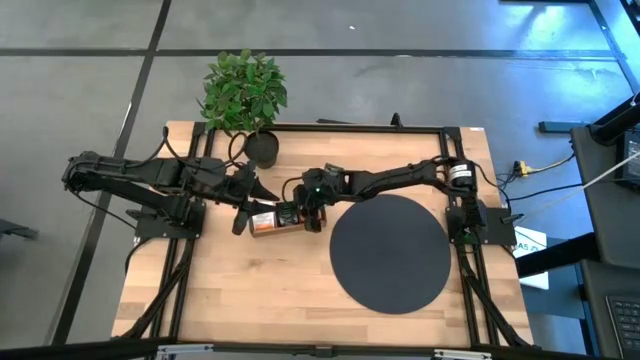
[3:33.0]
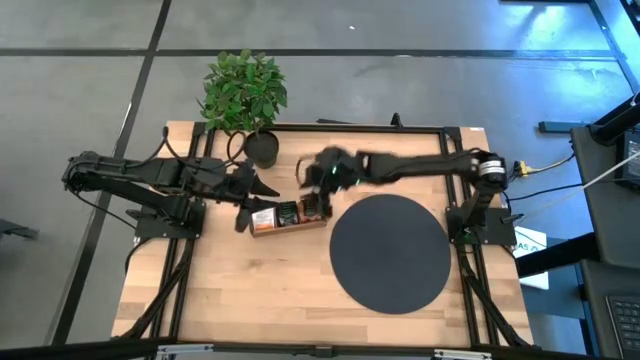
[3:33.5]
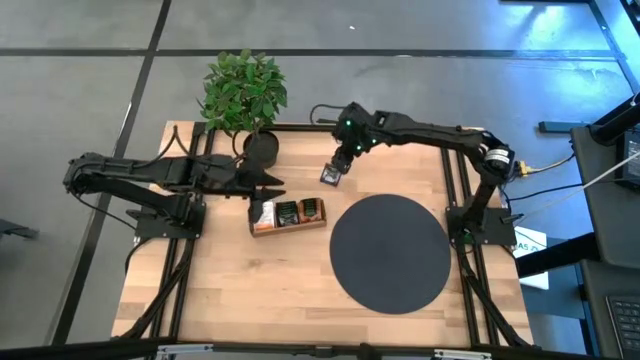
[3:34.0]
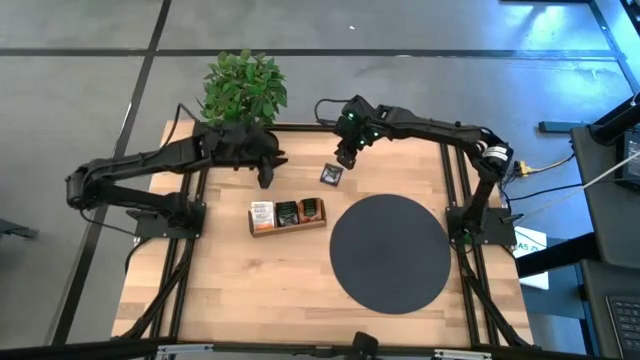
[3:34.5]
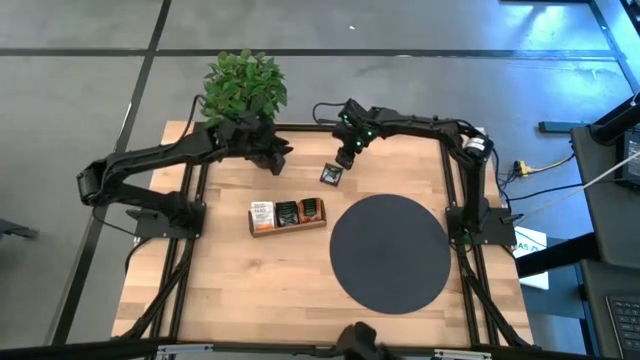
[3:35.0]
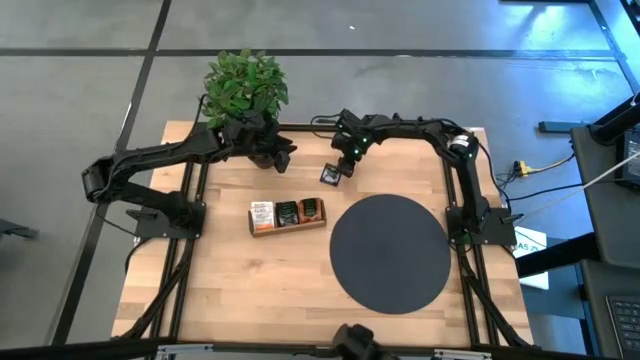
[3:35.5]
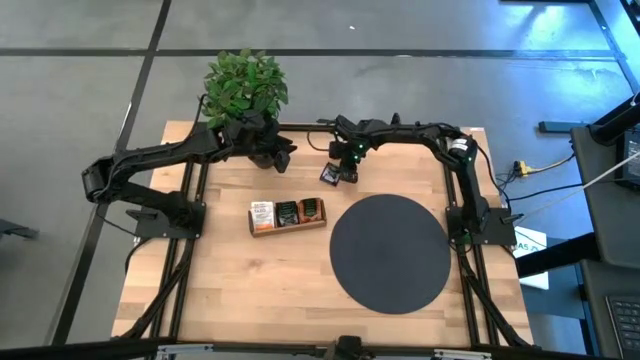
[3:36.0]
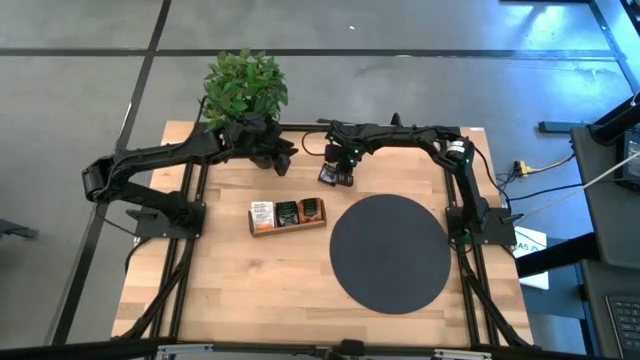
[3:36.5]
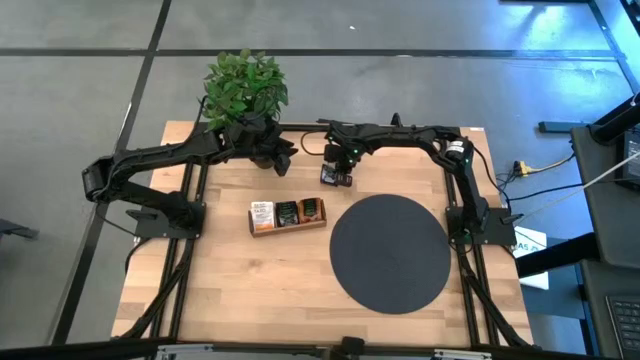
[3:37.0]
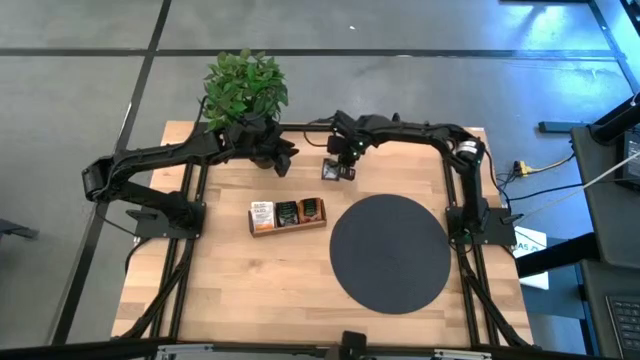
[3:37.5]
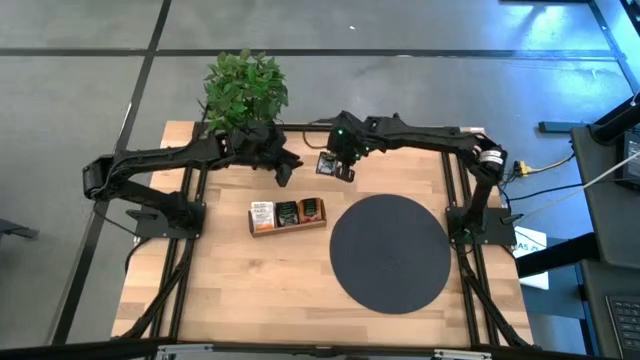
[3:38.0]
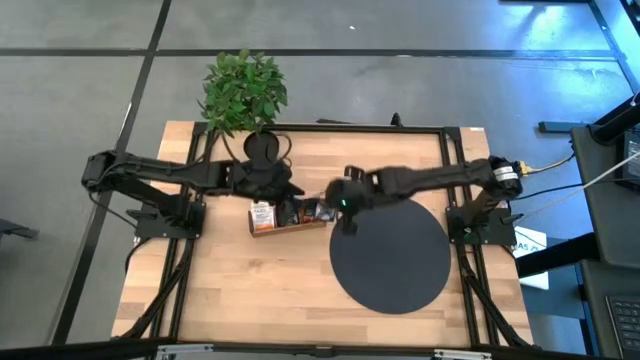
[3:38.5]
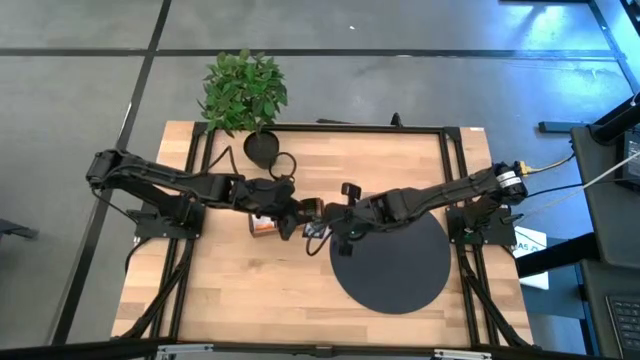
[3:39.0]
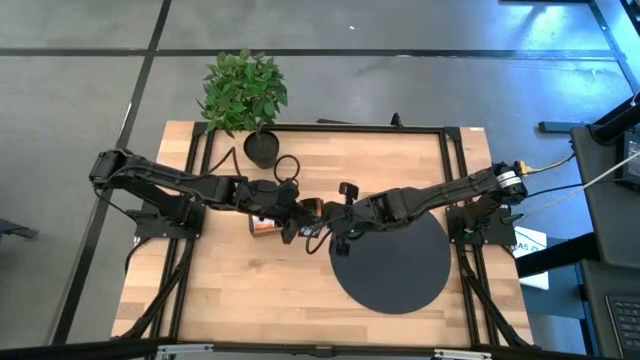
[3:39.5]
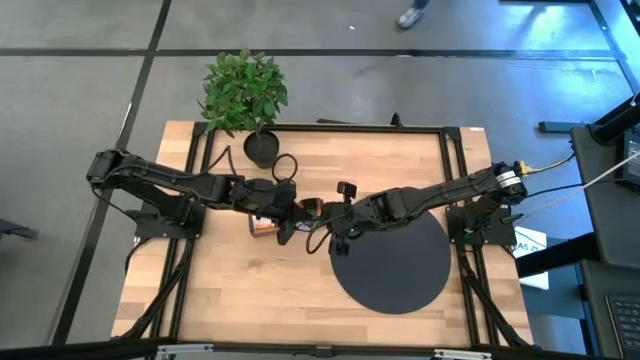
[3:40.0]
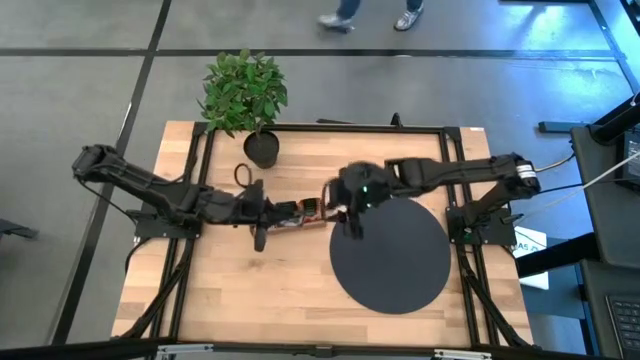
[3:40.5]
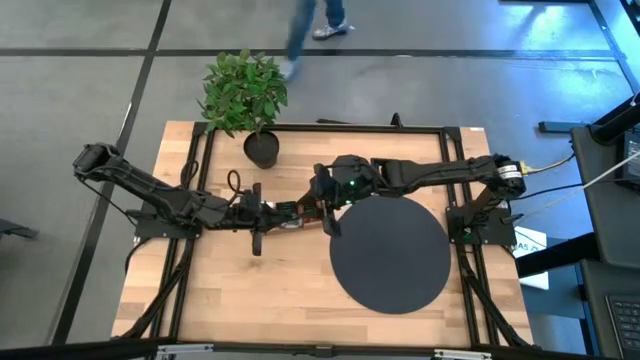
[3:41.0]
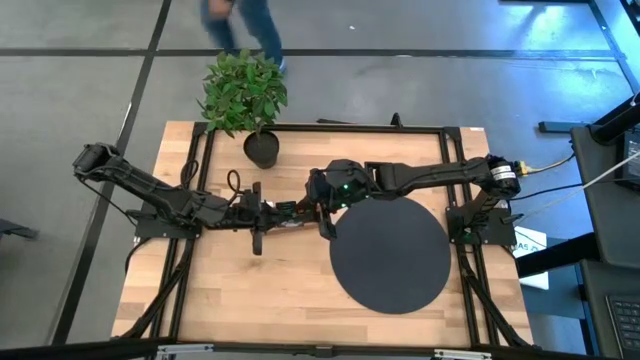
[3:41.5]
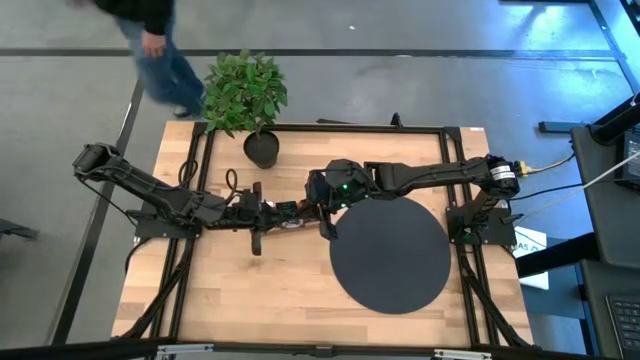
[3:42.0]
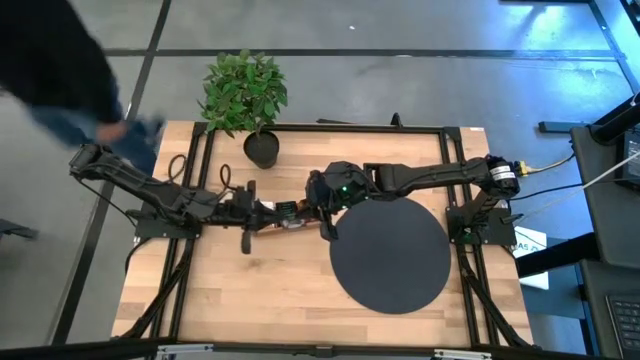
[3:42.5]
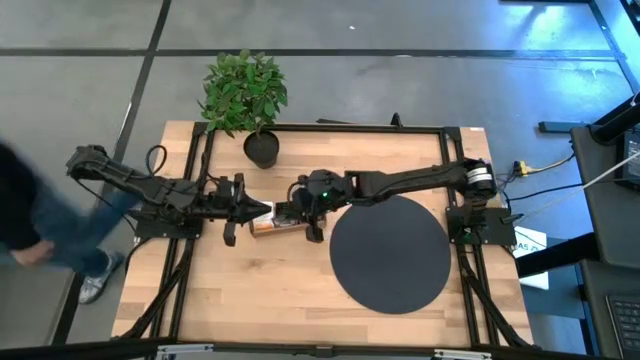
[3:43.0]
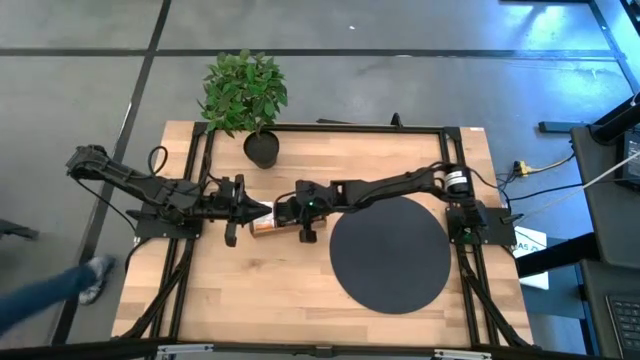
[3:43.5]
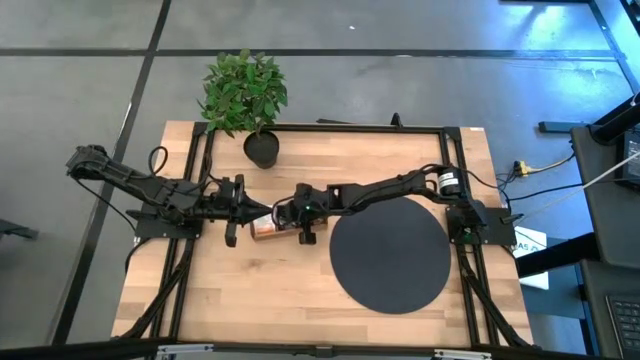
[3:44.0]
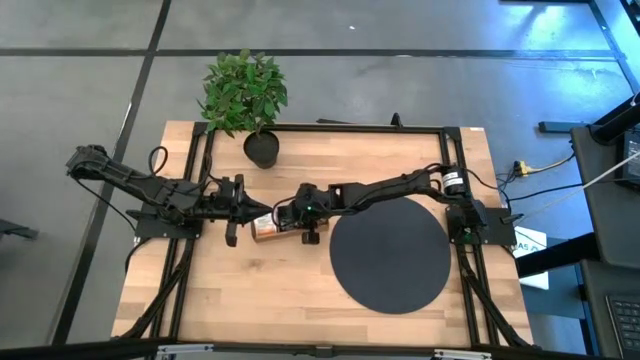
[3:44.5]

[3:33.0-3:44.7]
Task: Pick & Place Tea
Put the purple tea bag into the middle section of the wooden organizer

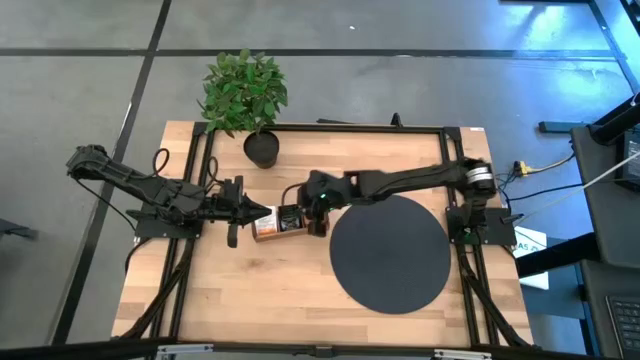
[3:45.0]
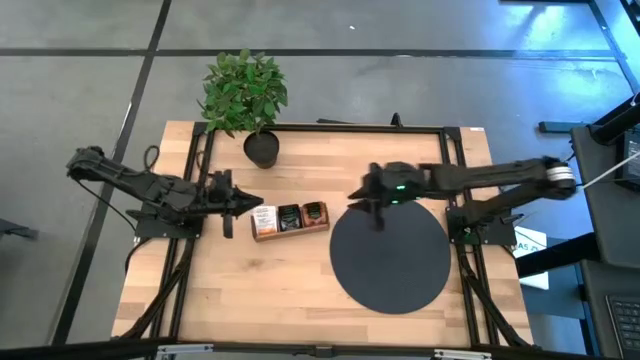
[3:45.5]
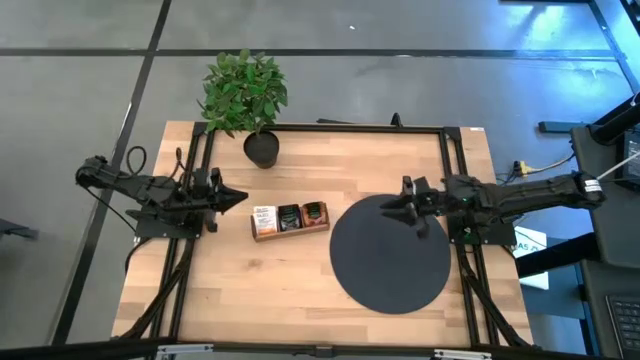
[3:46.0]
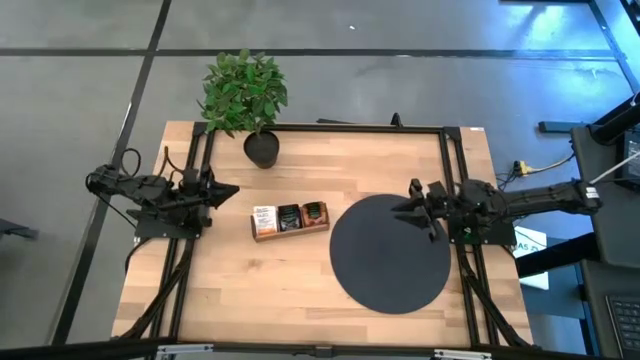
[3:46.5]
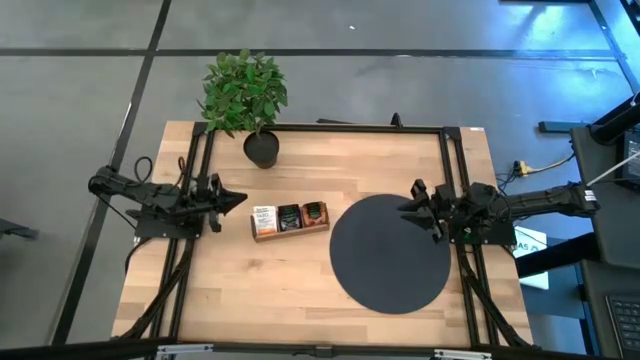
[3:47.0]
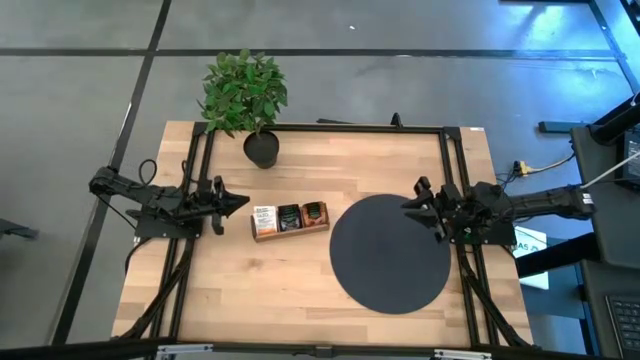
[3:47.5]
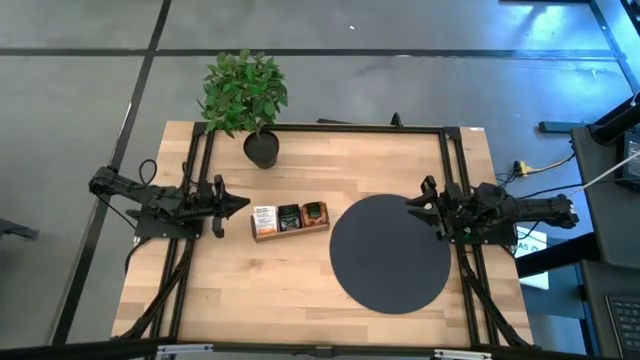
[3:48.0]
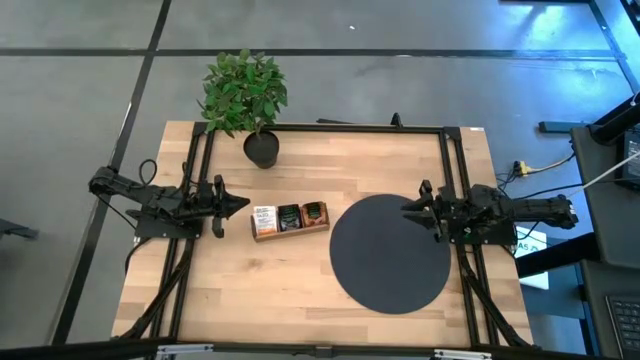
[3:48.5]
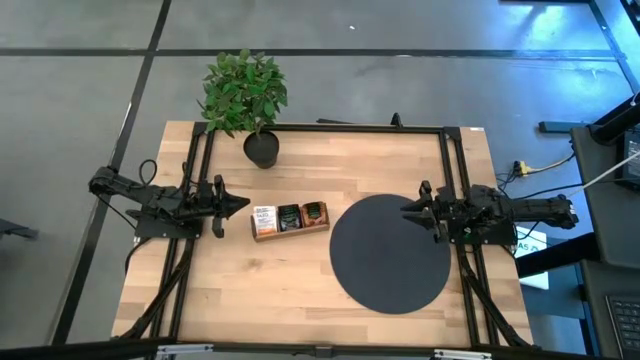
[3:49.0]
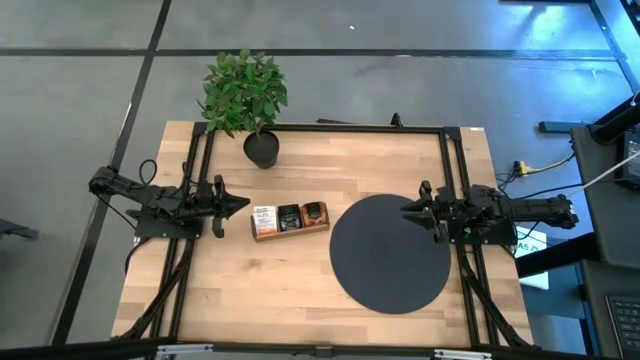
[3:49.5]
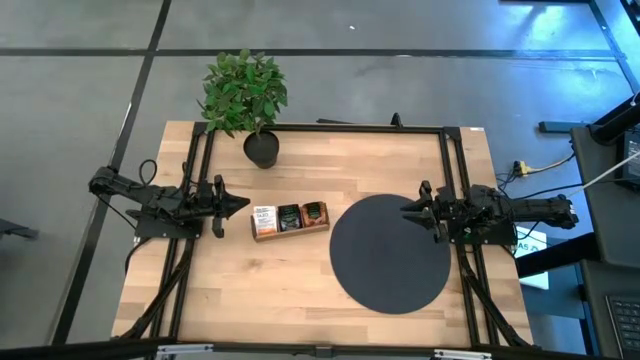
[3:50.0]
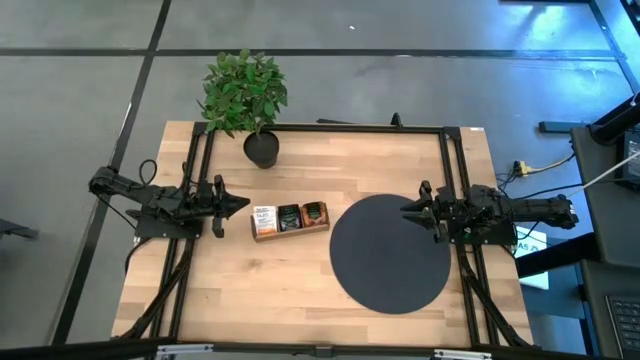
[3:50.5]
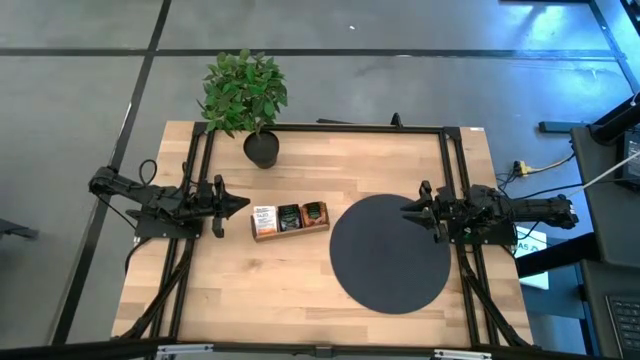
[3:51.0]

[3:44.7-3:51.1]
Return to Home Position

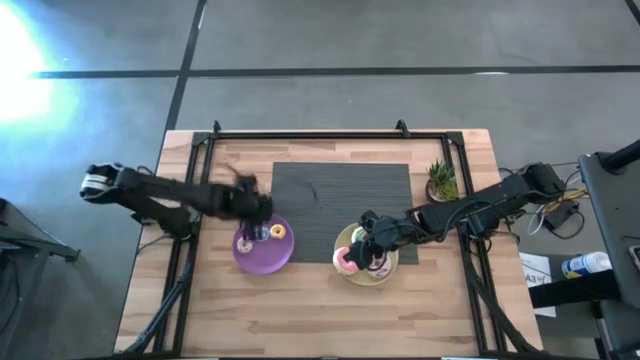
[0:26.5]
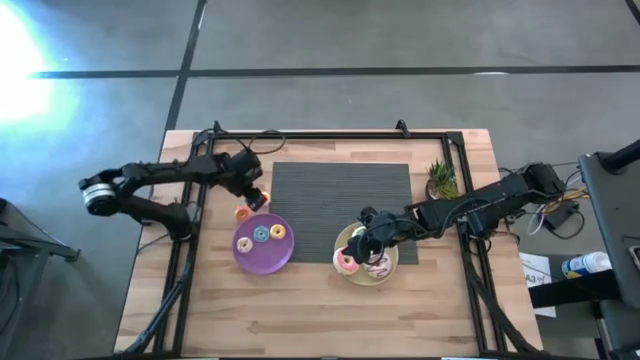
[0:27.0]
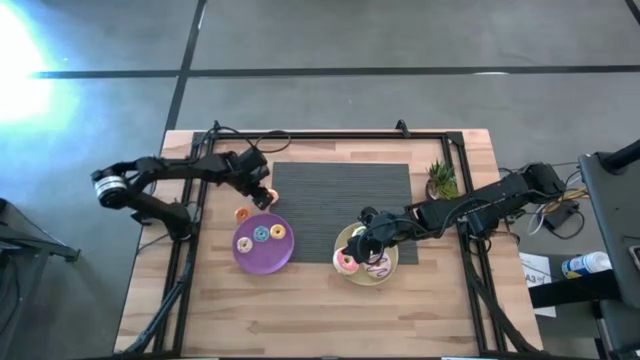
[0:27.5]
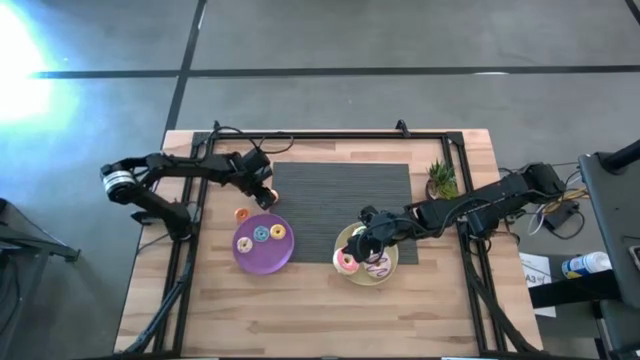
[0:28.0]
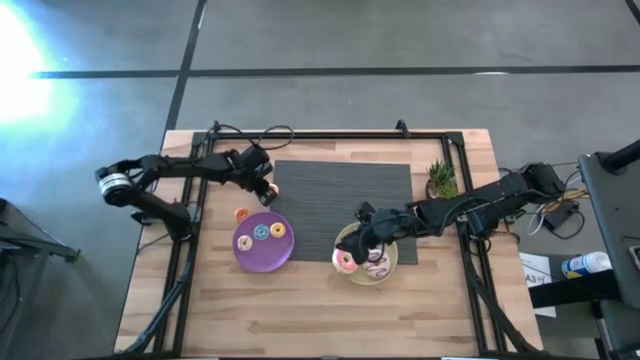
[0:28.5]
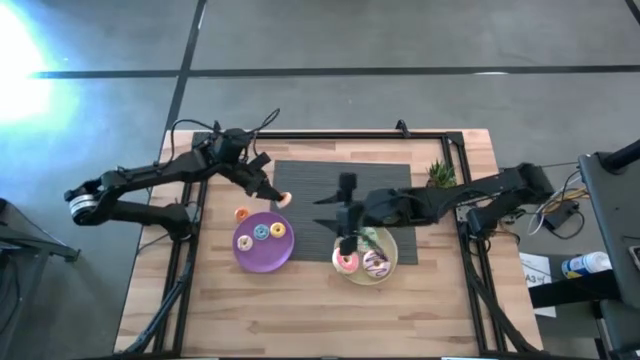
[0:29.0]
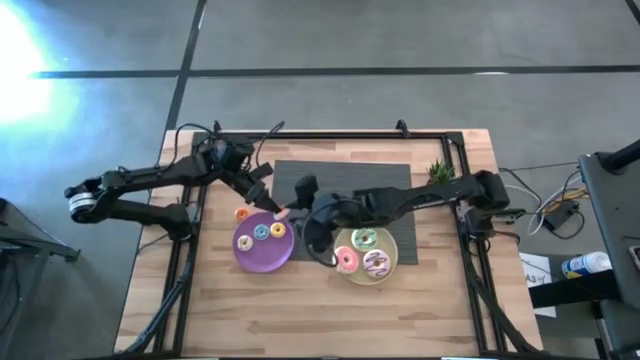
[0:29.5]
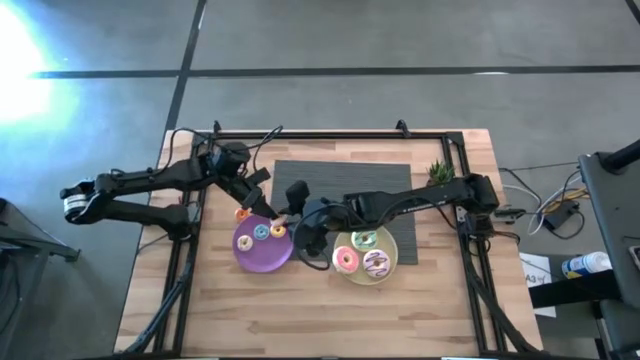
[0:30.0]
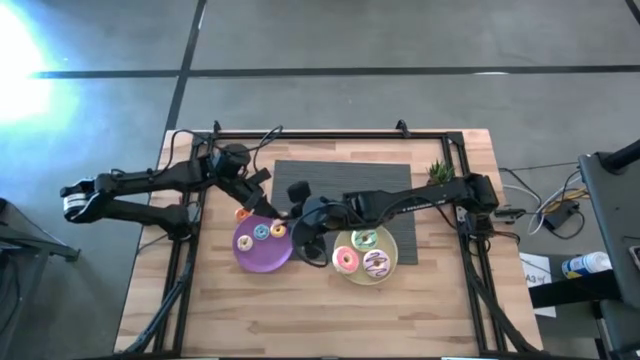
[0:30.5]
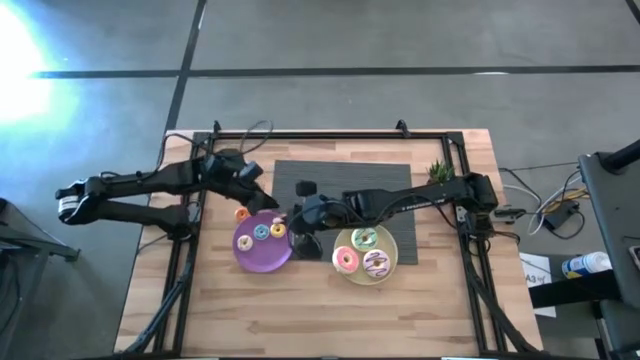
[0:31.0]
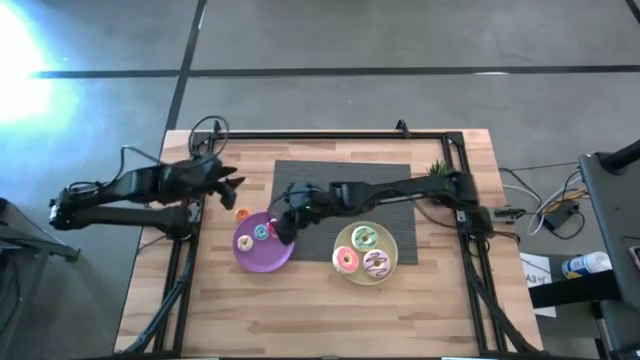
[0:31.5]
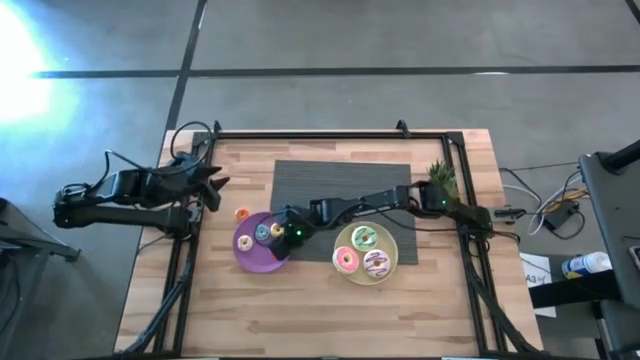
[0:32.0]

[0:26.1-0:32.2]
Task: Pick & Place donuts
Put the small red donut on the violet plate
